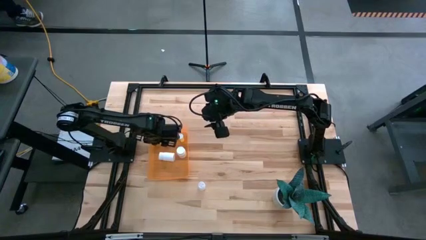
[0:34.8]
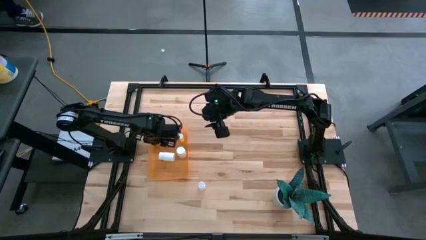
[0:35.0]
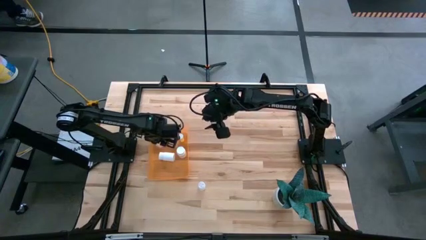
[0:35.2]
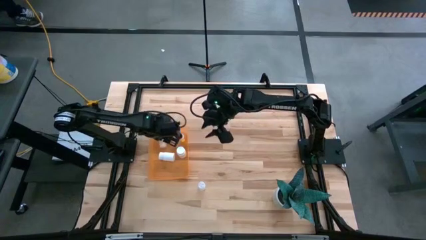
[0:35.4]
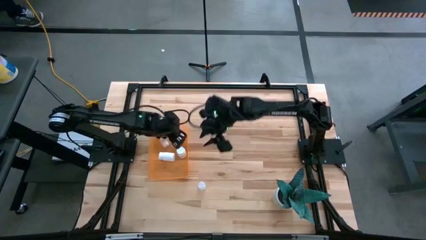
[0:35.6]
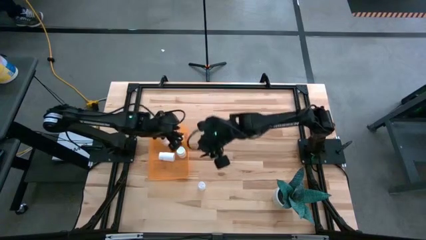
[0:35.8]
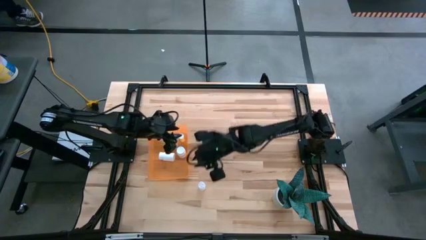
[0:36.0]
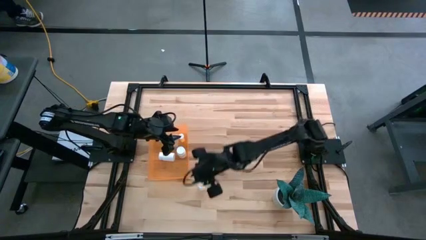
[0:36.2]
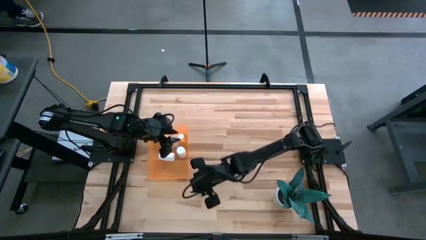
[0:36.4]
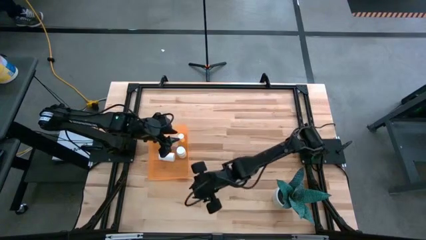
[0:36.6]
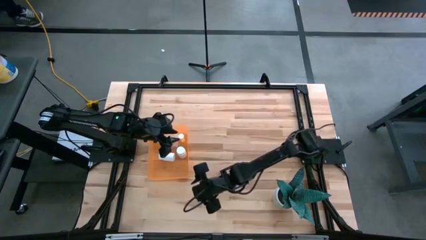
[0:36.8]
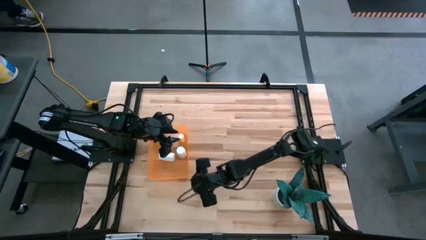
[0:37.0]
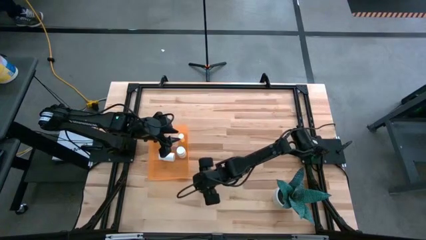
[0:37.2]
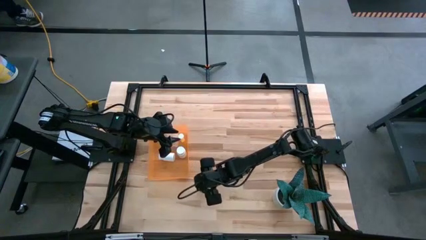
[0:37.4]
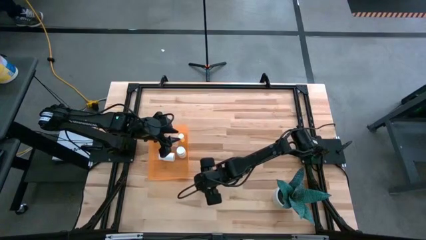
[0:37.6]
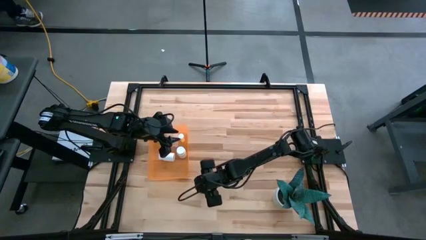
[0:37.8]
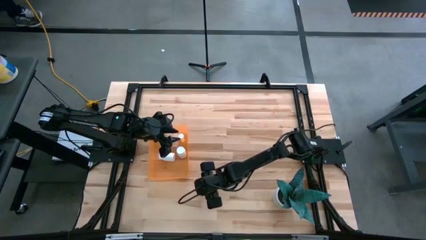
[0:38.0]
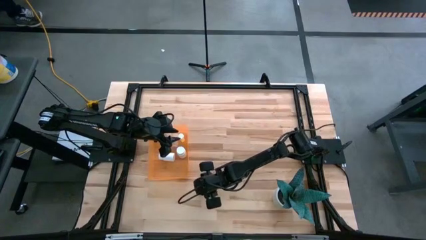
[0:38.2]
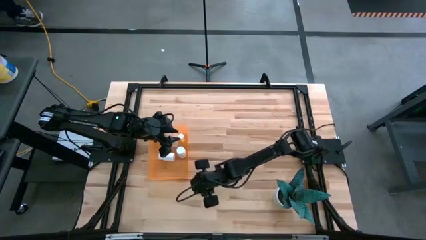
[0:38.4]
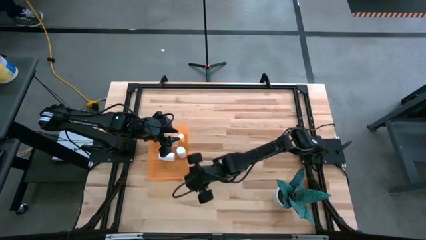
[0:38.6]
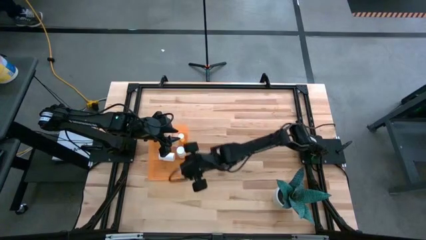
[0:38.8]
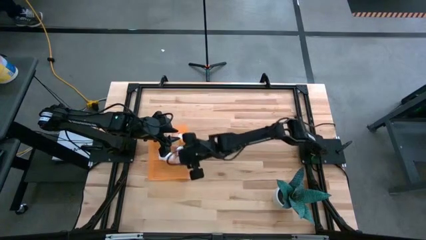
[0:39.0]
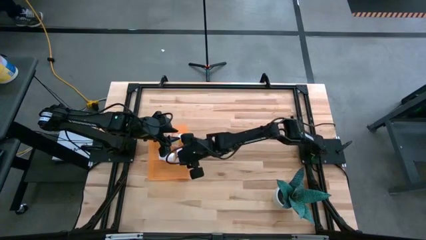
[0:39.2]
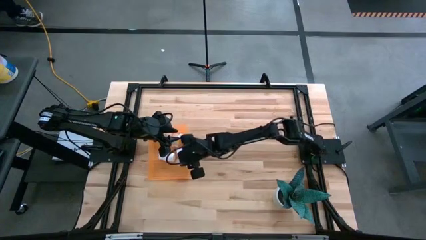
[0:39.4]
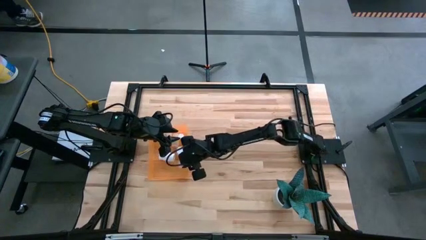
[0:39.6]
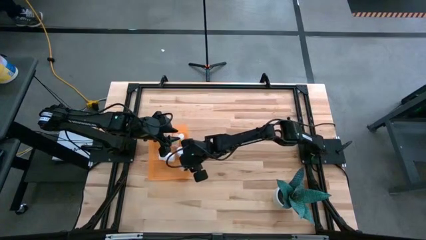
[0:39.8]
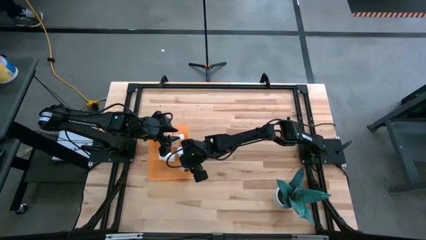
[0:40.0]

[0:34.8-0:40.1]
Task: Pick and place pill bottles into a basket
Put the transparent pill bottle into the orange bin

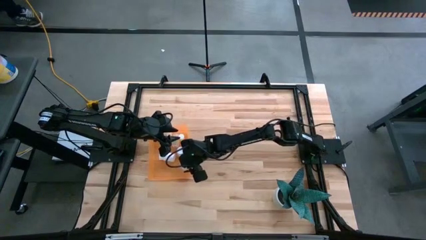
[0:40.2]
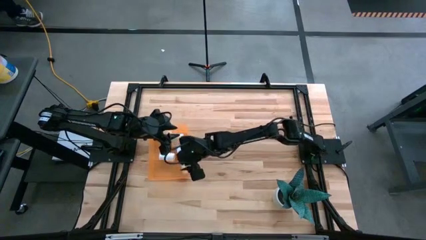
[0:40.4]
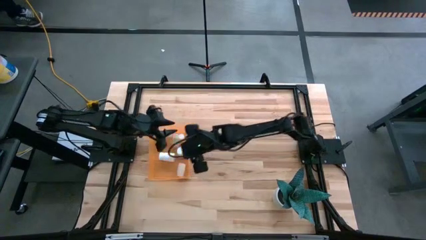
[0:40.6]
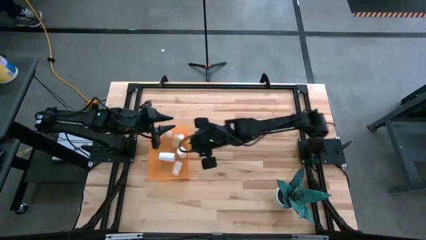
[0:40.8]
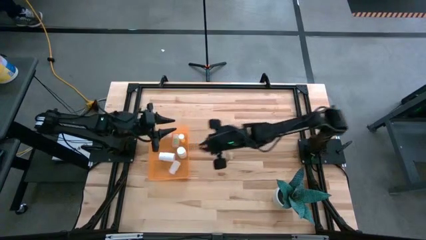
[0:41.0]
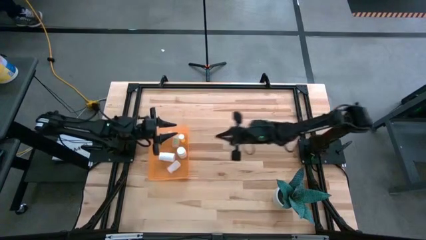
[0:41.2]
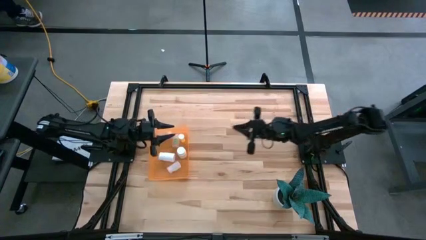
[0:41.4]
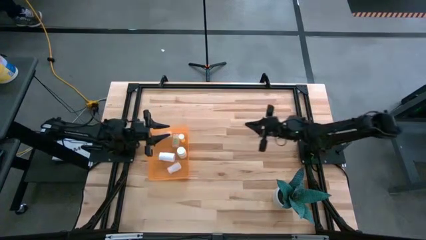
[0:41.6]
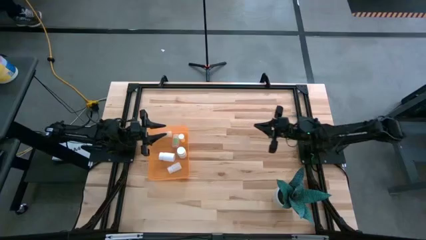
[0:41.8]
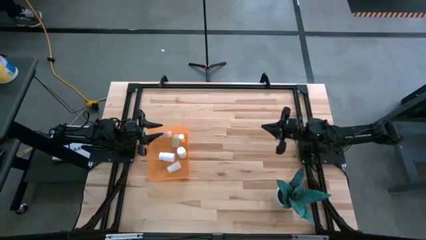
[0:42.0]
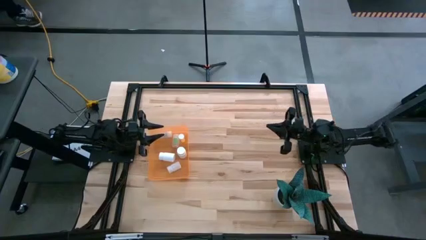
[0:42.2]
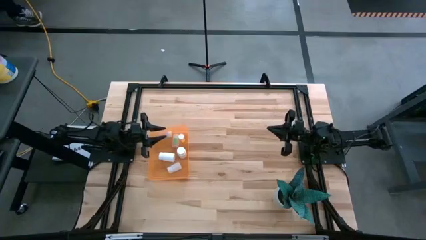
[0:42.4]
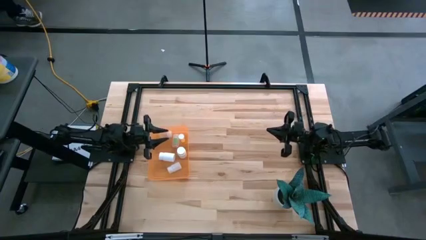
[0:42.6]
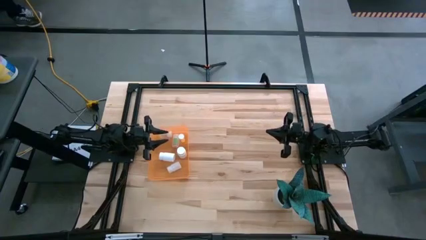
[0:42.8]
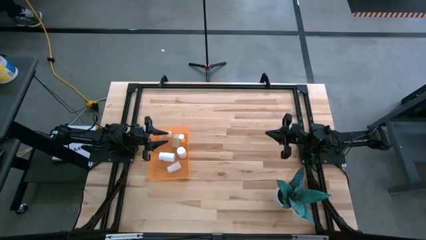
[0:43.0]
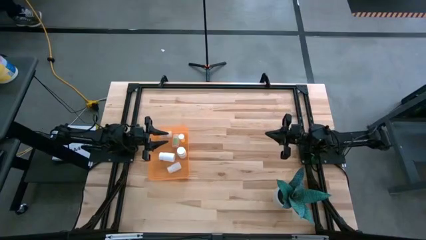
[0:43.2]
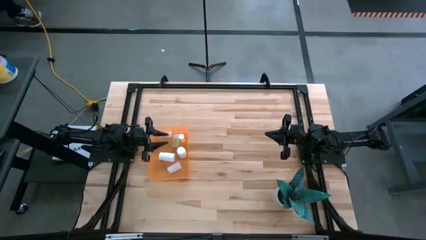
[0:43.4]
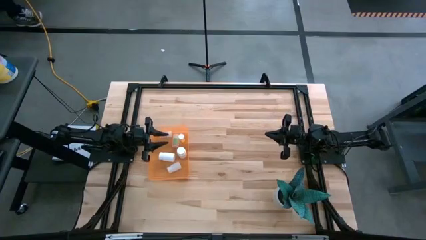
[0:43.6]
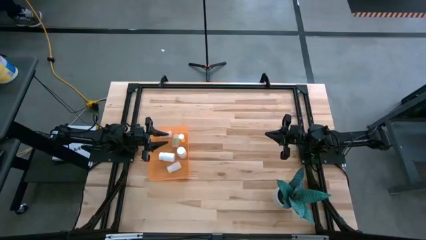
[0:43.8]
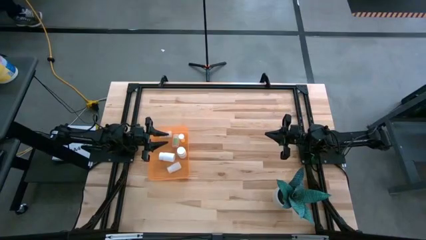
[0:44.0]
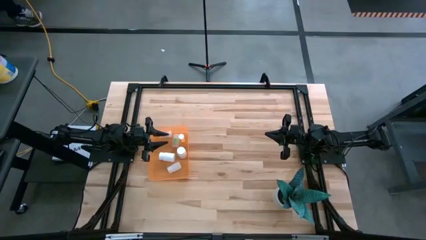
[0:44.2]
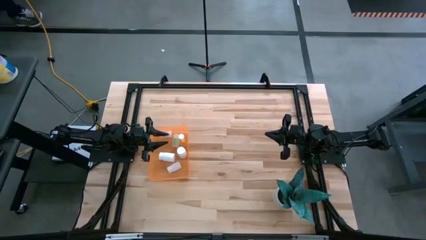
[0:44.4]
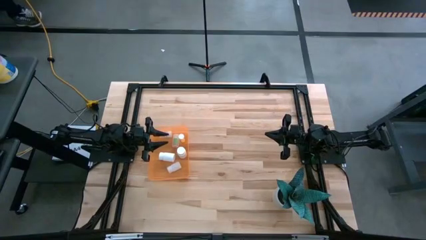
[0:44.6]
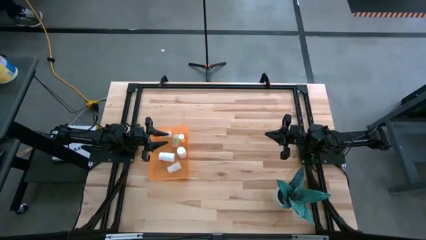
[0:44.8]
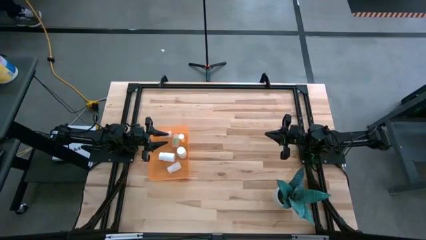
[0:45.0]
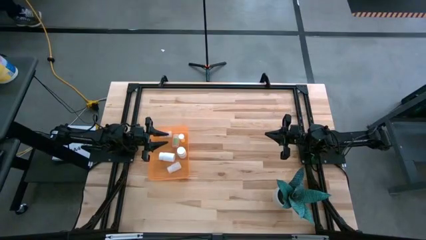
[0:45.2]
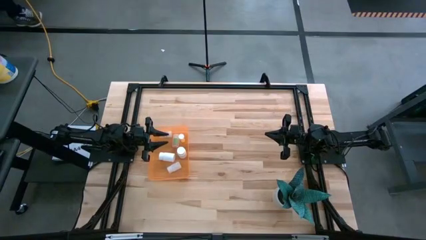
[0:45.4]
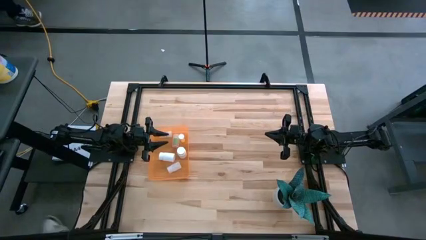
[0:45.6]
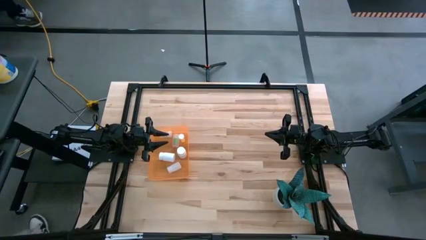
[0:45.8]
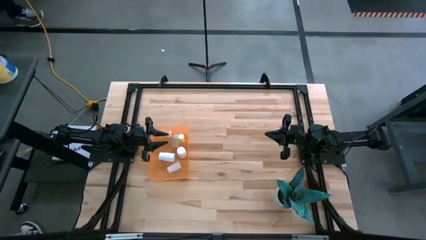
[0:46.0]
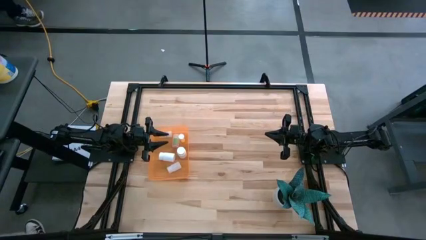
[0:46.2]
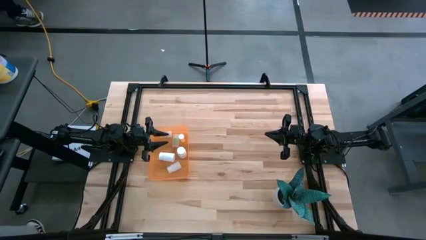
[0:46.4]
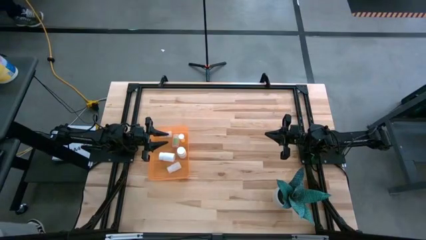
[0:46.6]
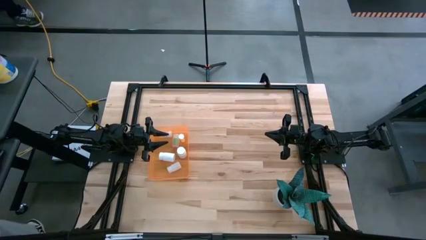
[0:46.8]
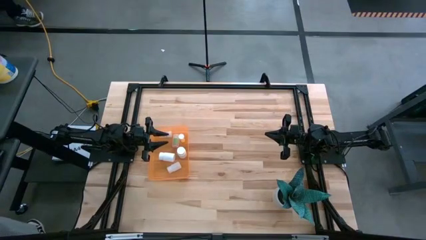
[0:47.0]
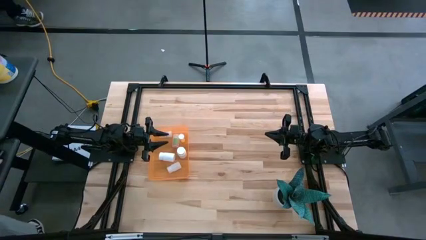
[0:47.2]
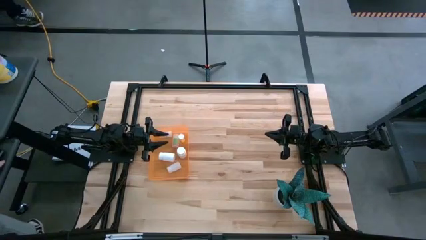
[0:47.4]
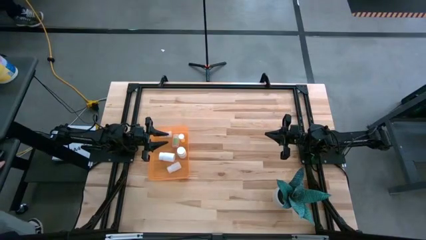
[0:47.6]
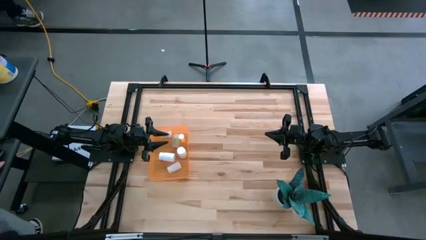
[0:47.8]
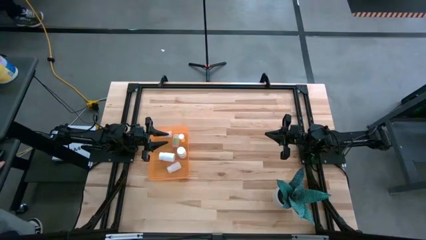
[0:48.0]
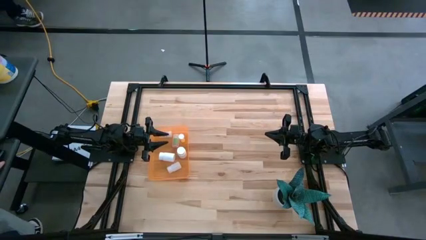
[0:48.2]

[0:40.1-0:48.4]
Return to Home Position

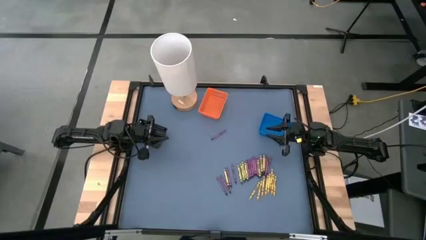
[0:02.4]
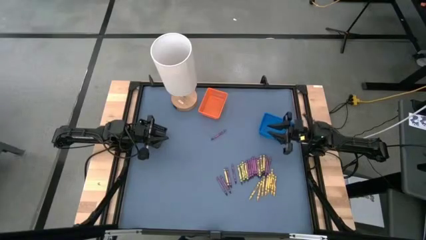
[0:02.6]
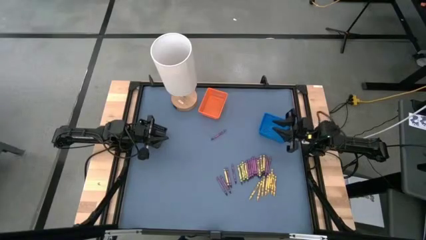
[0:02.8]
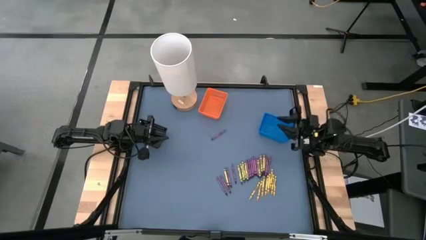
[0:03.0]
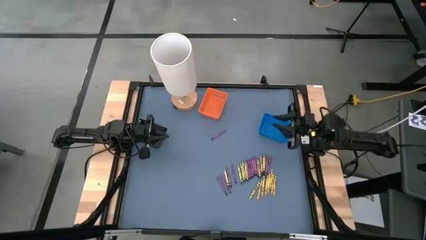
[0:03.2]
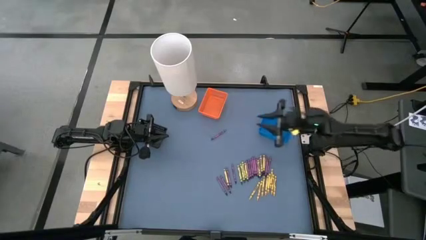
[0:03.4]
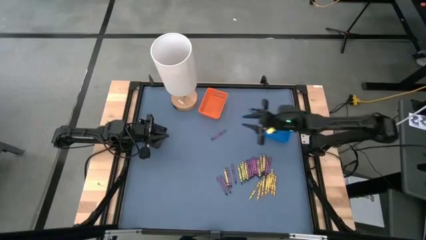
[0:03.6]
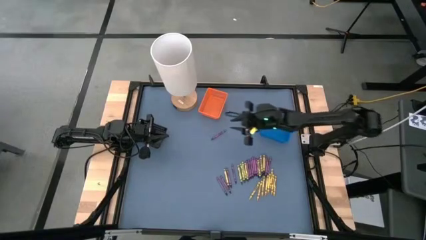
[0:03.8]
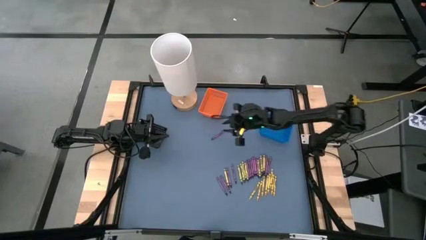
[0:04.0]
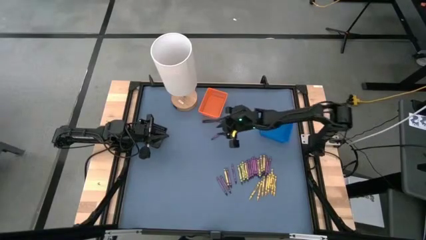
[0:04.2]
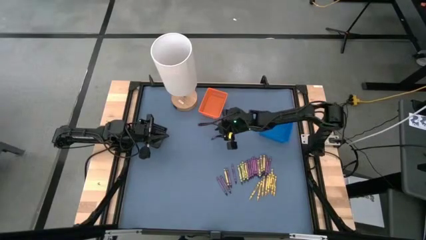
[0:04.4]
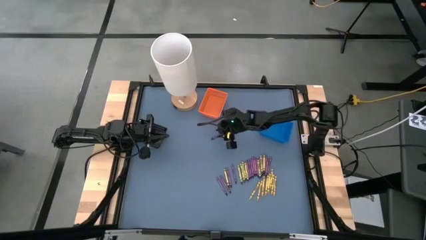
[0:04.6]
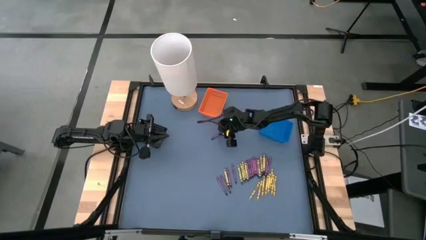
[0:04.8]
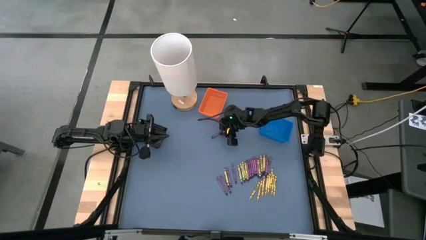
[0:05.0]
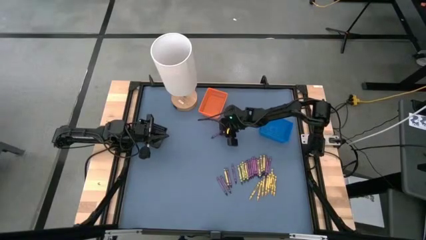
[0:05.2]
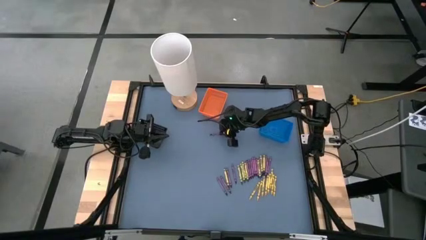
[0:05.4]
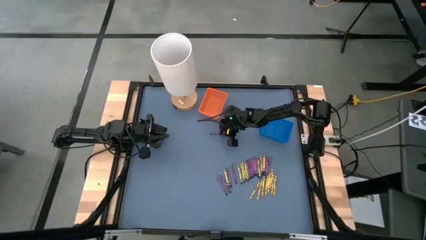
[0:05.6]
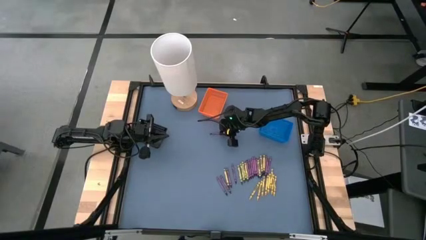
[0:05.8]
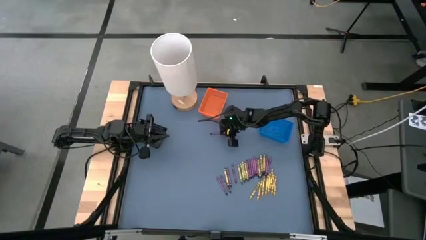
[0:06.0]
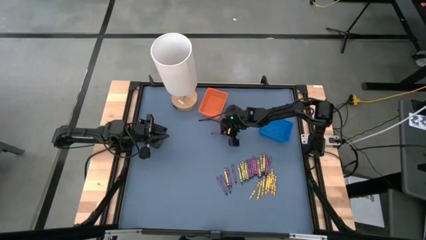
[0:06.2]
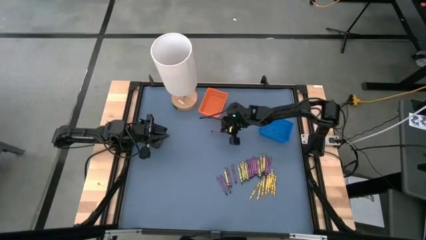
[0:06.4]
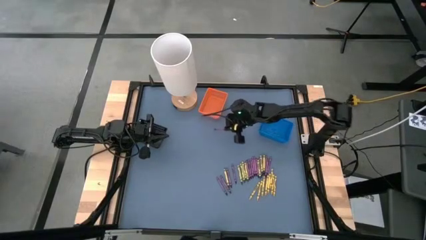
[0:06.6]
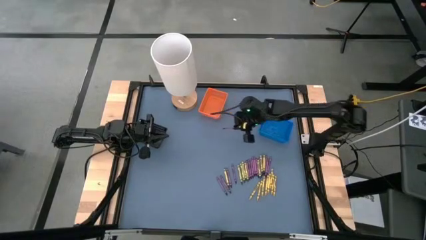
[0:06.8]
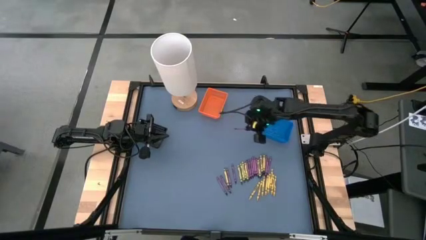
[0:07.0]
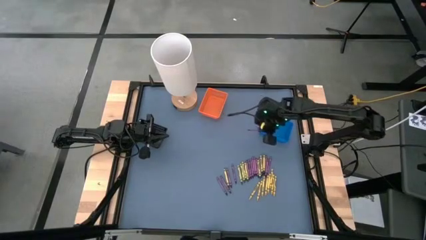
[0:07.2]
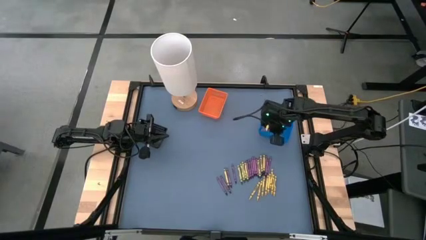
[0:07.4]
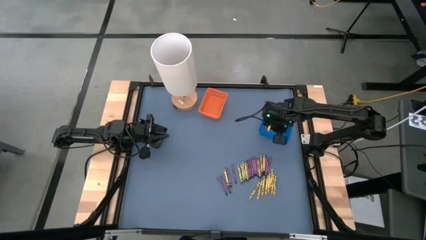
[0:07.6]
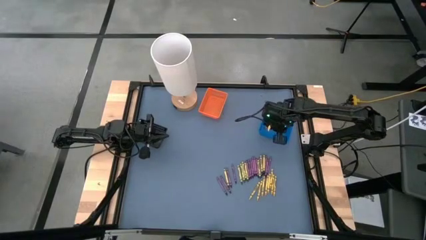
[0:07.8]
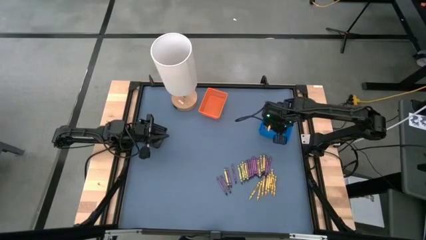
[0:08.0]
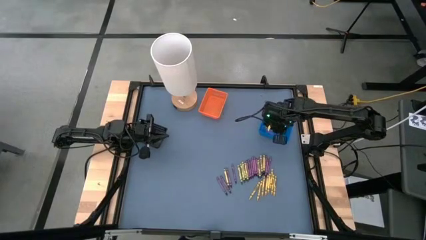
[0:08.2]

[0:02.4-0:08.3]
Task: Sort crayons
Put the violet crayon into the blue basket
